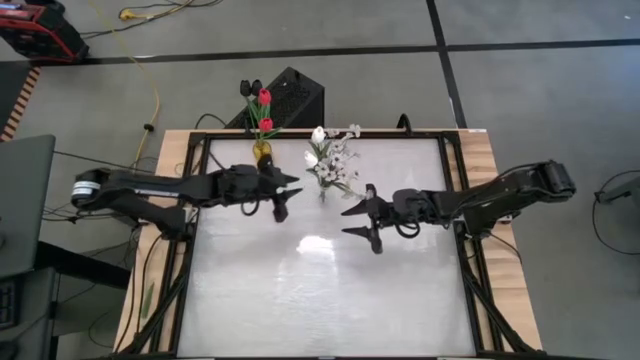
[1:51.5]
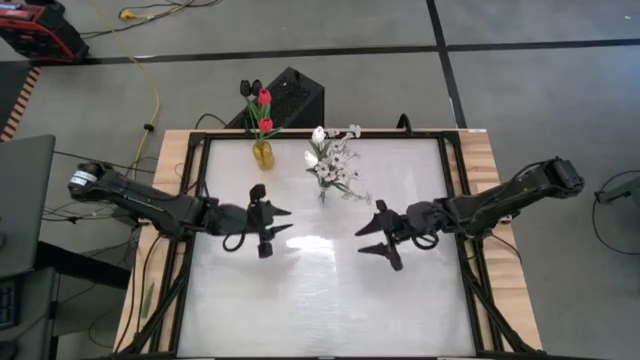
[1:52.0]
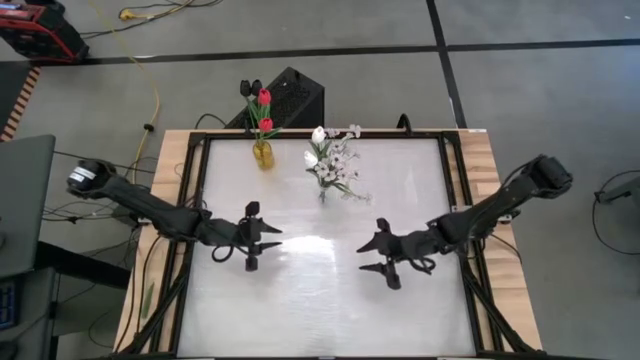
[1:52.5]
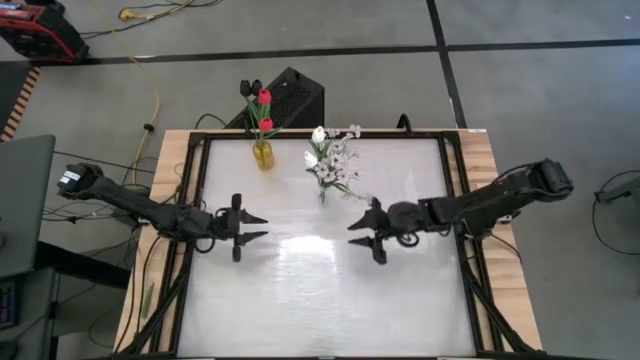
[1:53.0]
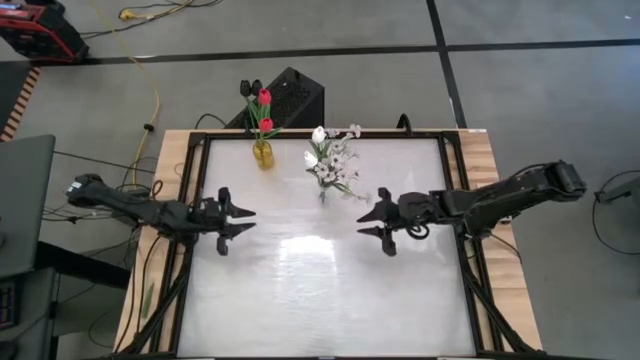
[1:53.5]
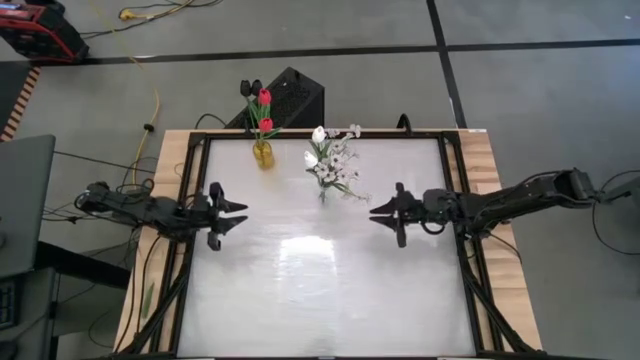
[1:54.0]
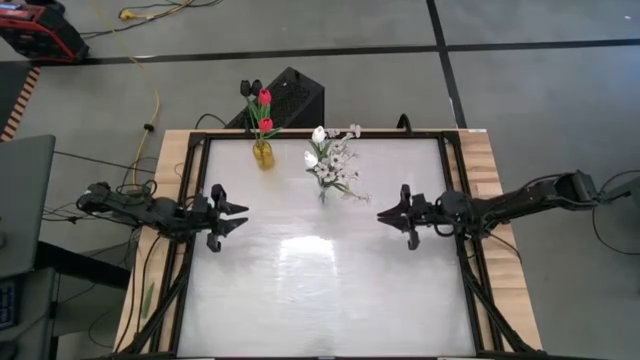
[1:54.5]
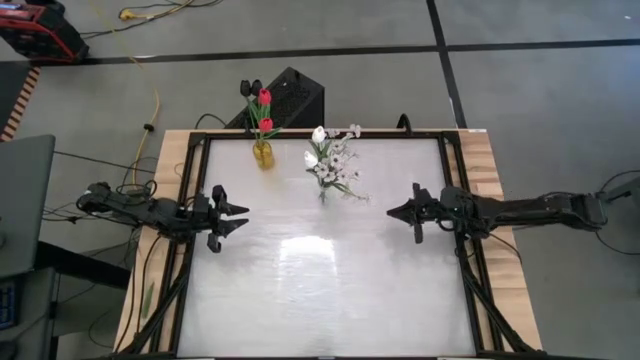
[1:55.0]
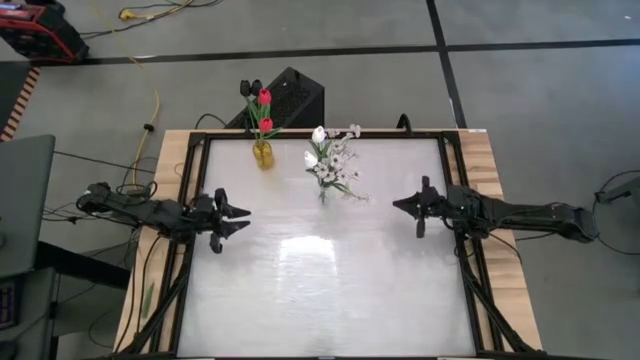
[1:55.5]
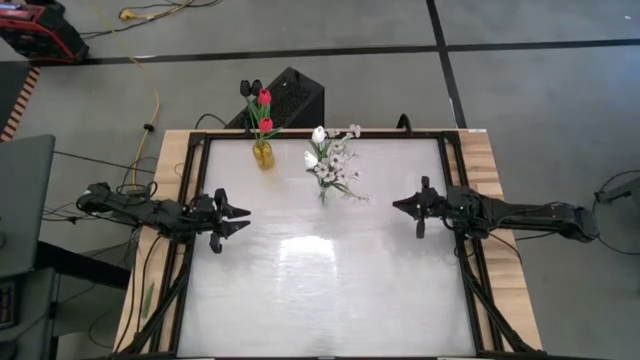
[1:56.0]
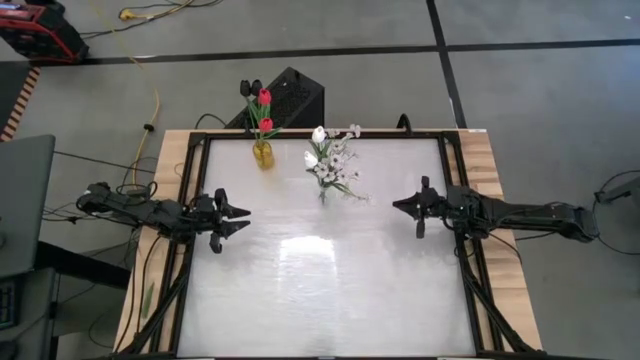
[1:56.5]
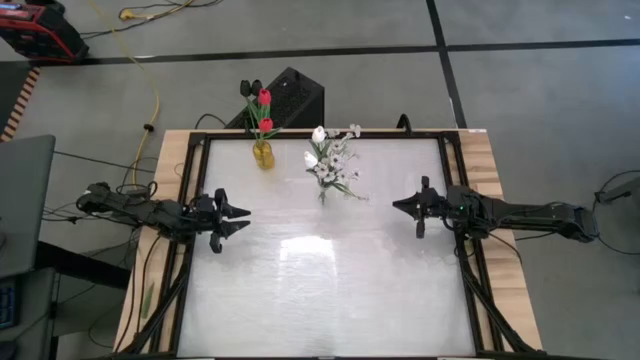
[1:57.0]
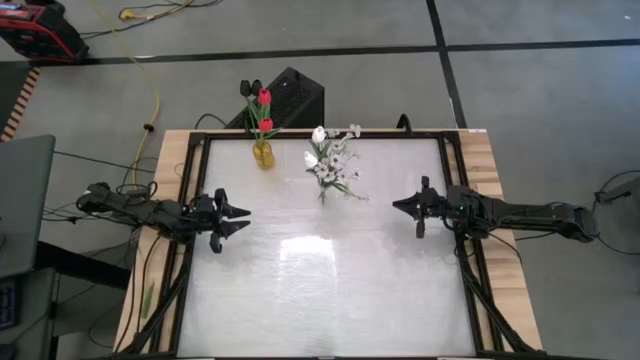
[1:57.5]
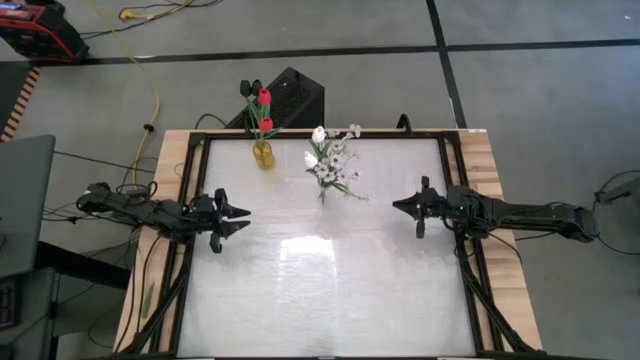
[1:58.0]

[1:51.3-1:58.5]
Task: Sort flowers into vase by color
Return to Home Position

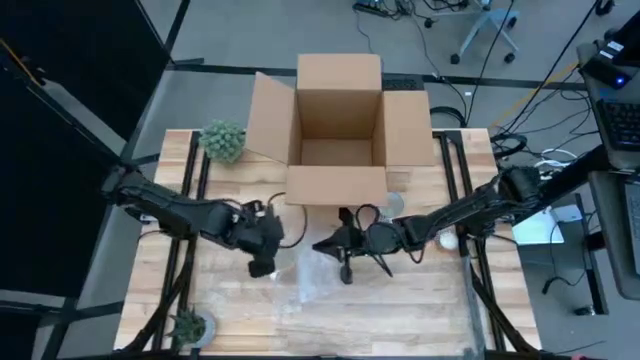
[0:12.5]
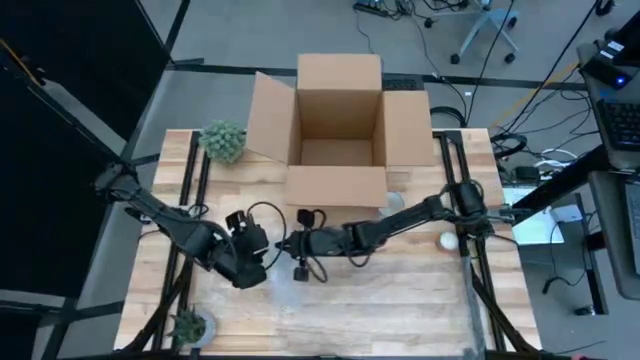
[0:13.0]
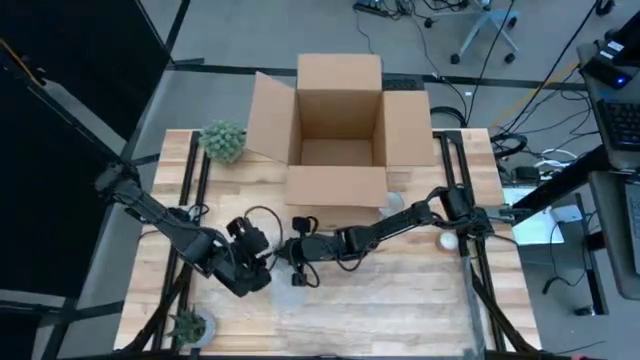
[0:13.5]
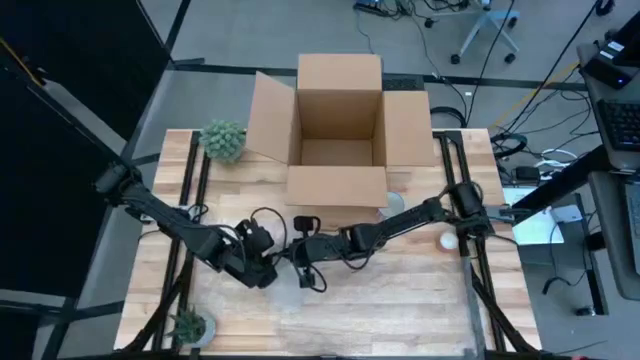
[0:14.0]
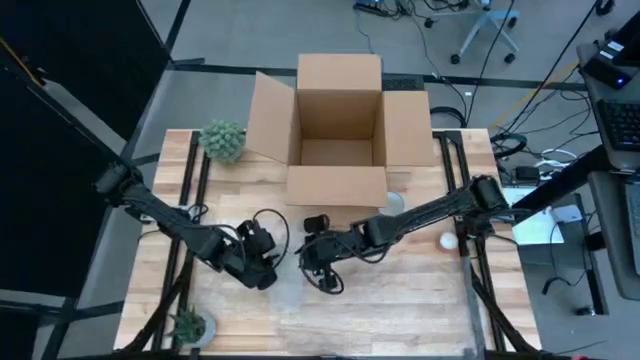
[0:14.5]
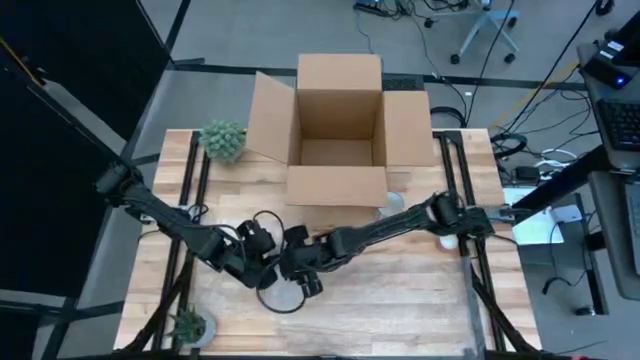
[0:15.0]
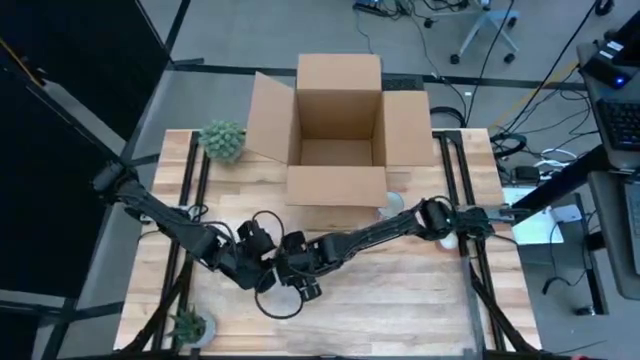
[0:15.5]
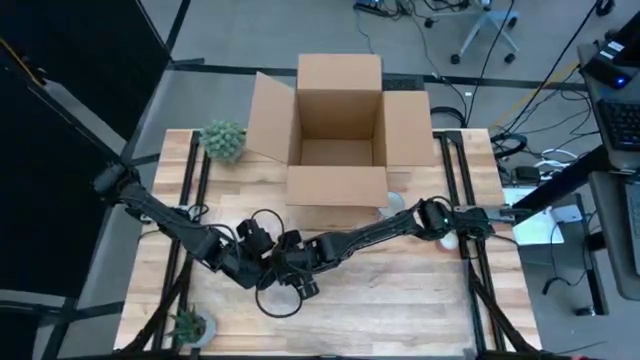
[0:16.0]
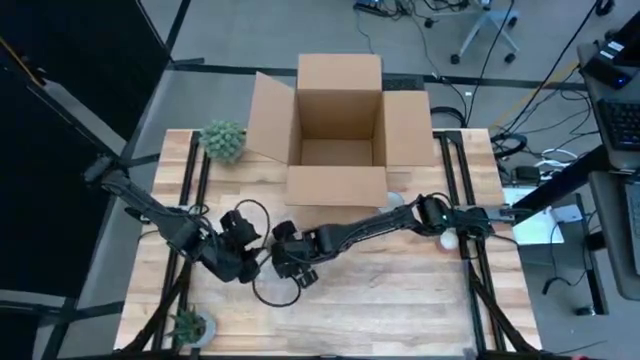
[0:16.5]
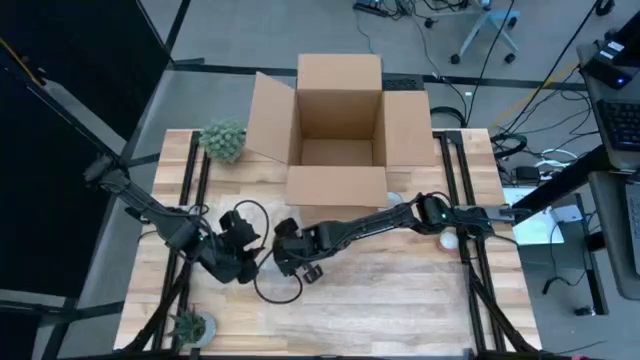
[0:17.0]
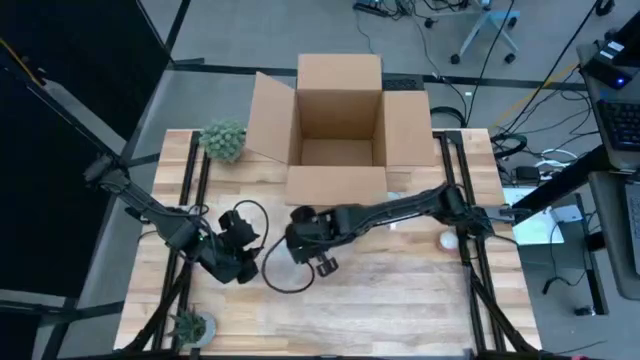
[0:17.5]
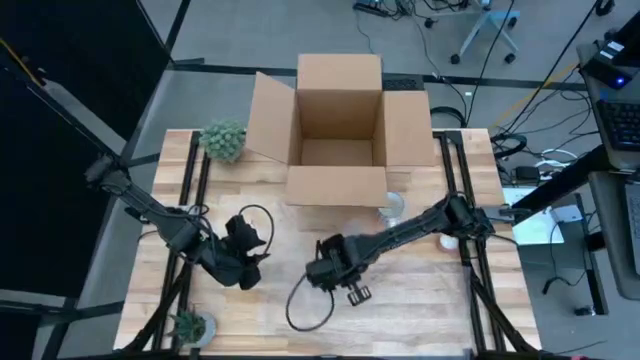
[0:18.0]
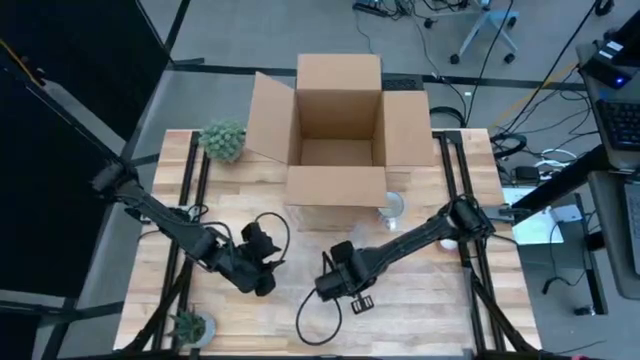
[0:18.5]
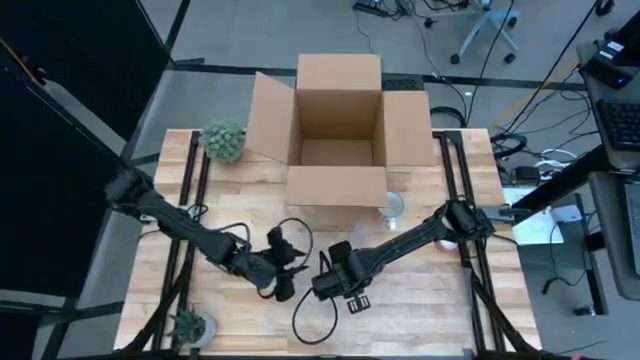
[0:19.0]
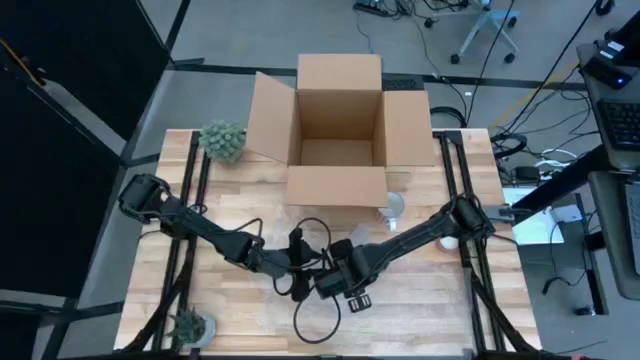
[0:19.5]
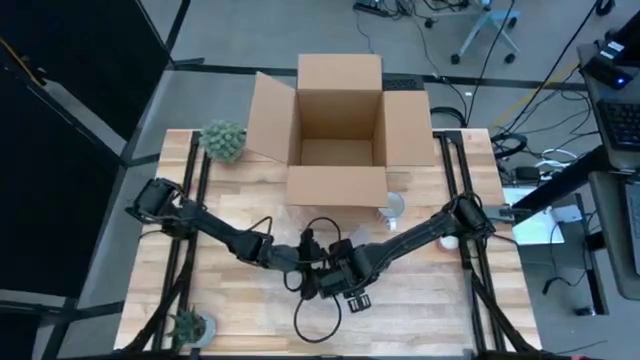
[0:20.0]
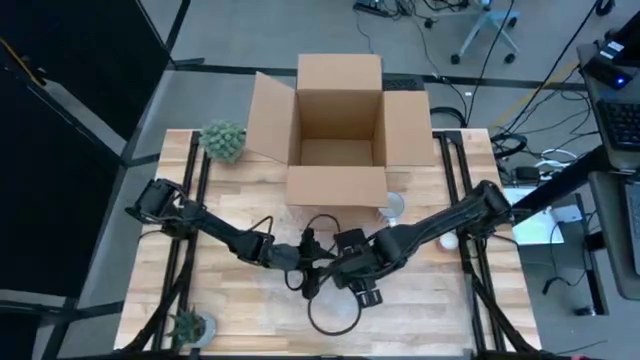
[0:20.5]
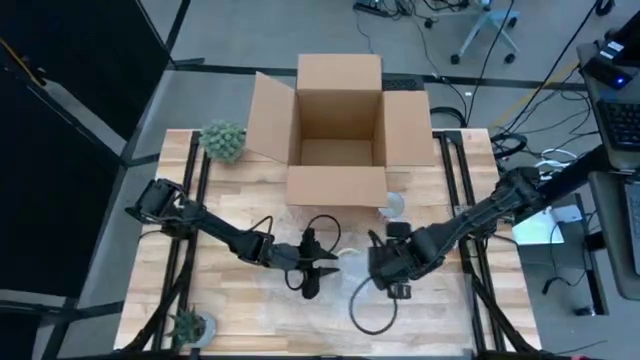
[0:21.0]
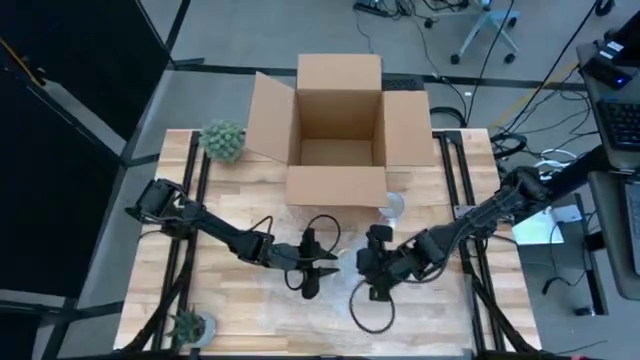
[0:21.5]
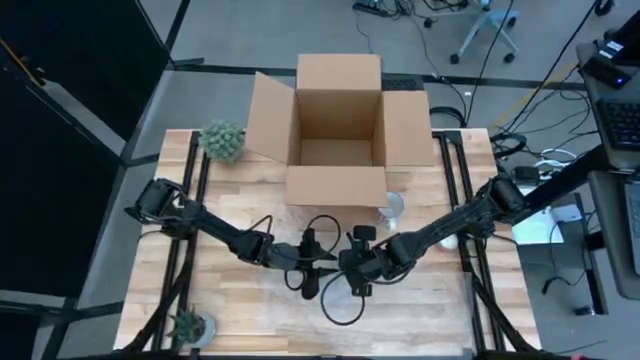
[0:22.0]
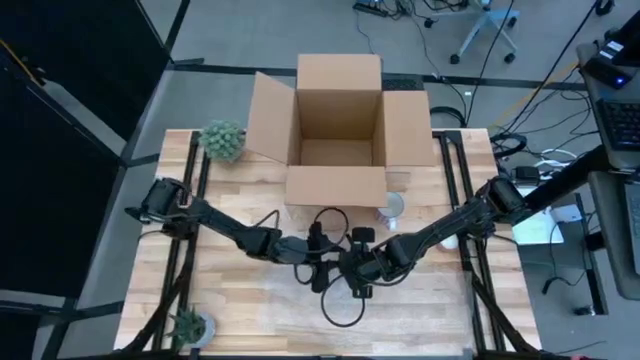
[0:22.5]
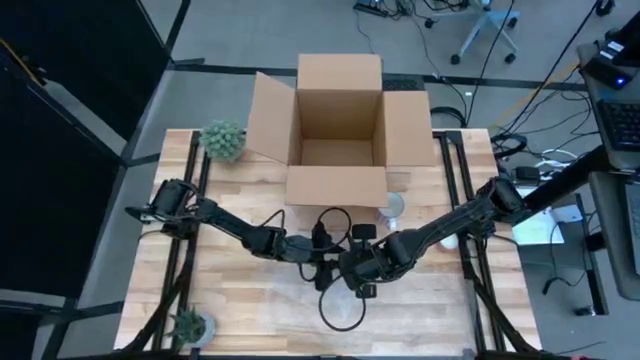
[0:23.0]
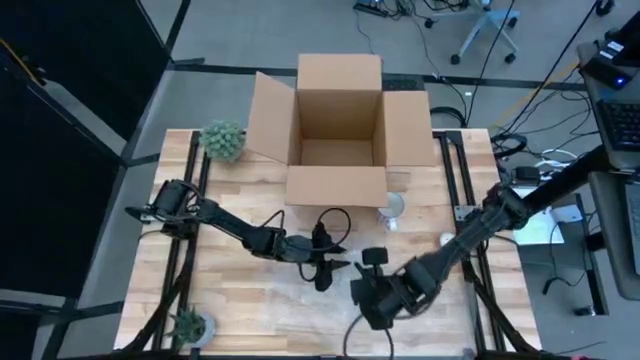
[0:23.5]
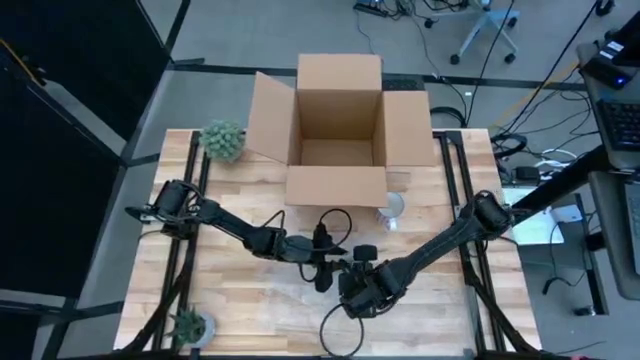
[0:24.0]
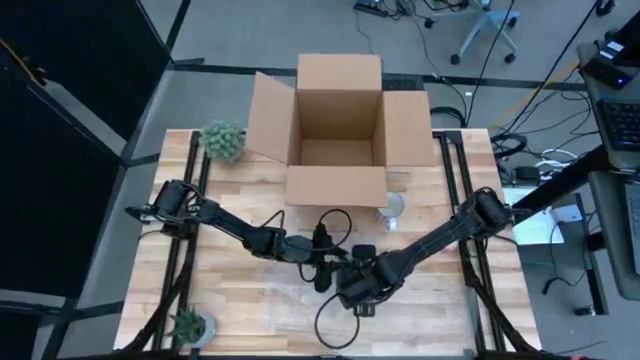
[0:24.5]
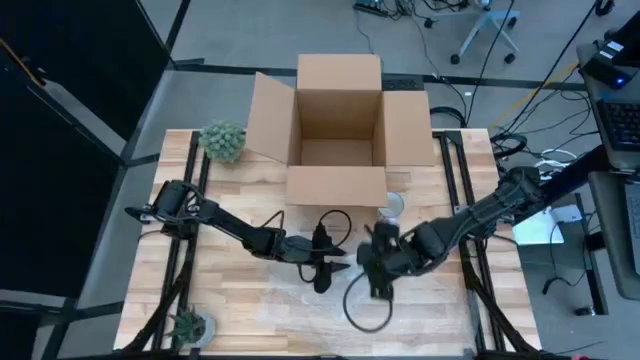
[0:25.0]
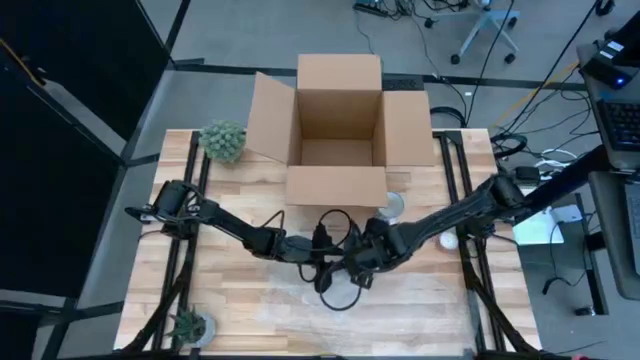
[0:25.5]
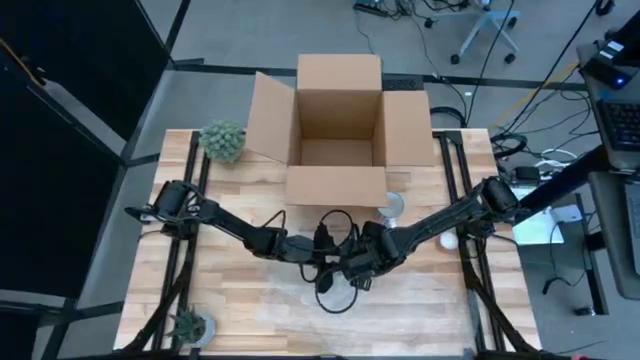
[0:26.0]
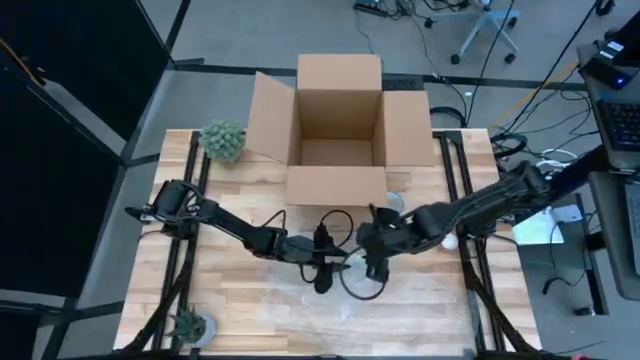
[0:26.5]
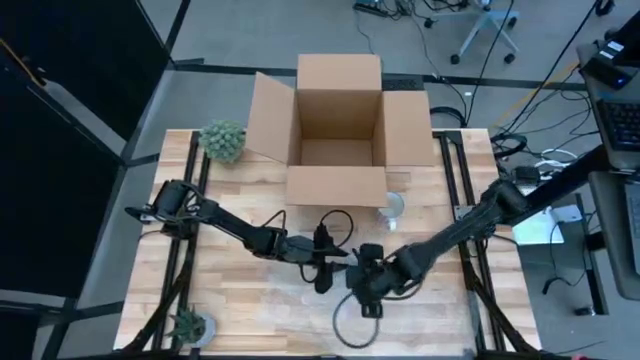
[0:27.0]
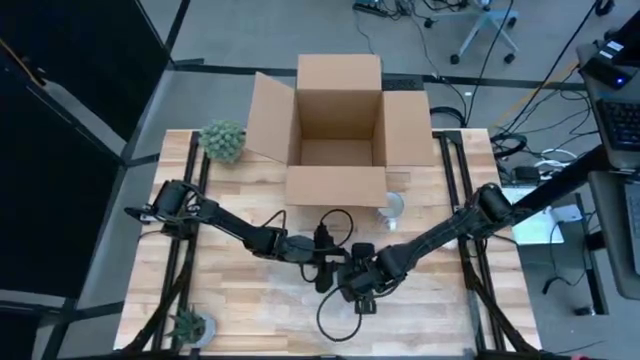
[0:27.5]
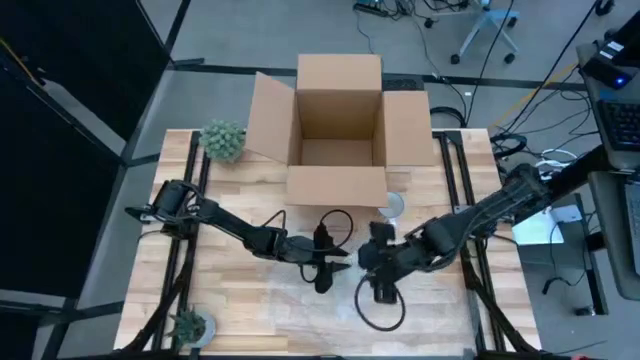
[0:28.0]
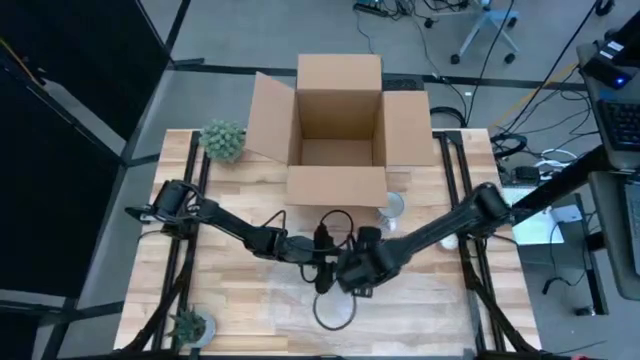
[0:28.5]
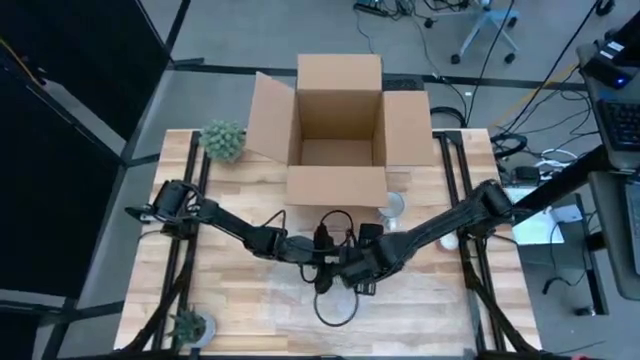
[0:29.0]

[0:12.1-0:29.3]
Task: wrap mug
Wrap the orange mug with the bubble wrap
